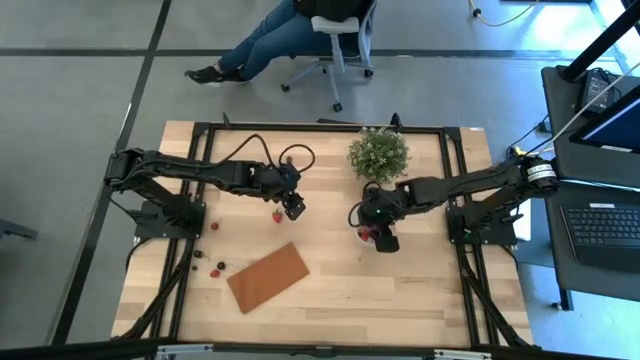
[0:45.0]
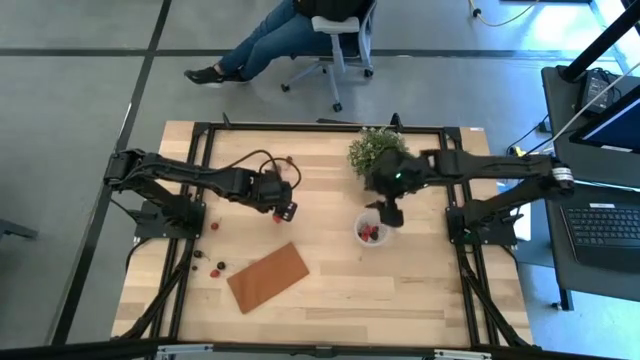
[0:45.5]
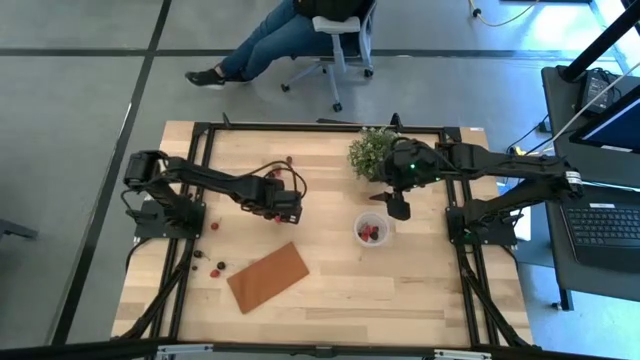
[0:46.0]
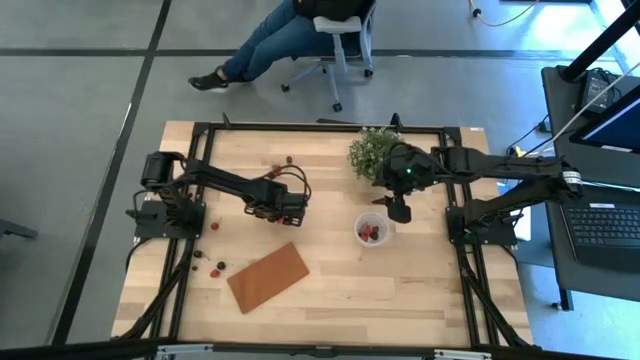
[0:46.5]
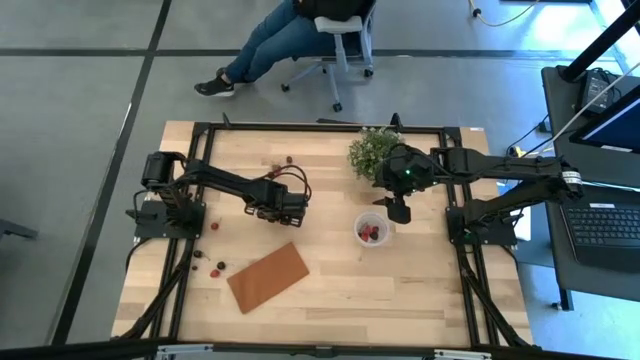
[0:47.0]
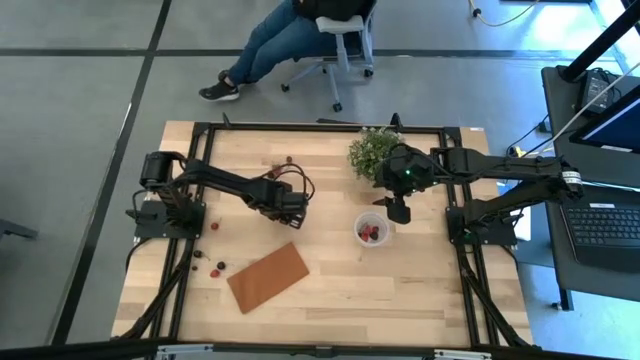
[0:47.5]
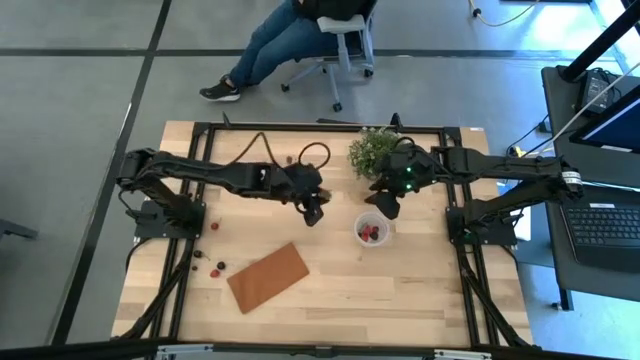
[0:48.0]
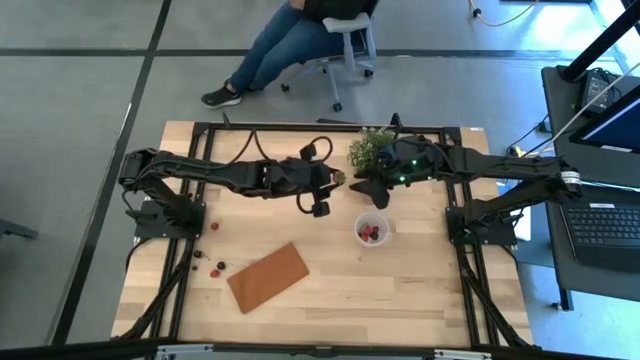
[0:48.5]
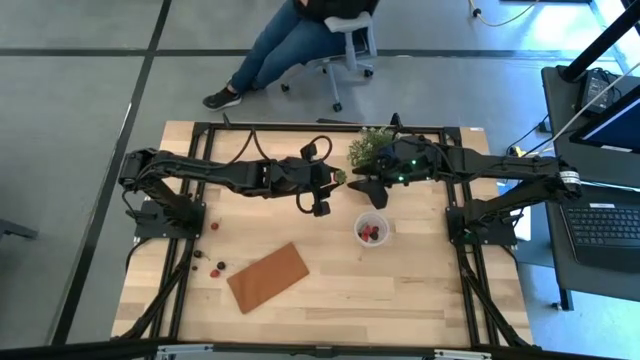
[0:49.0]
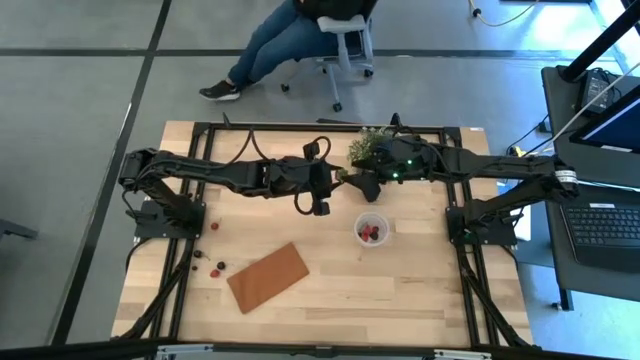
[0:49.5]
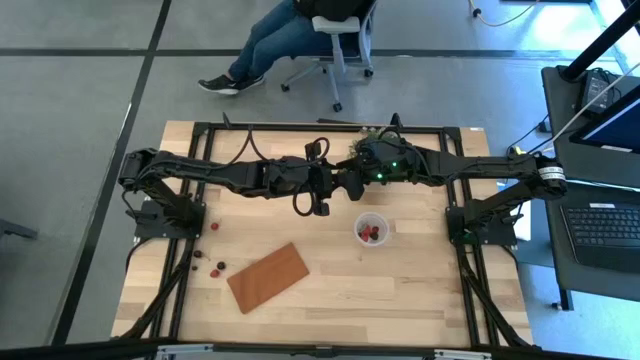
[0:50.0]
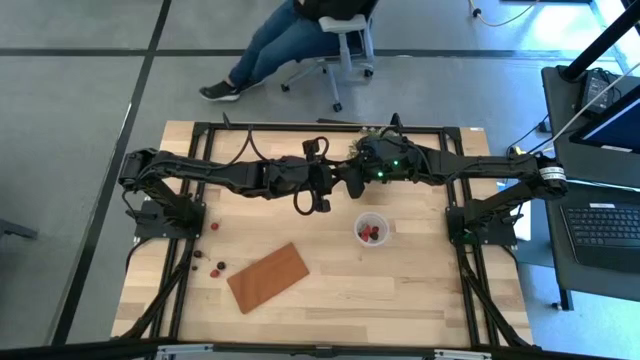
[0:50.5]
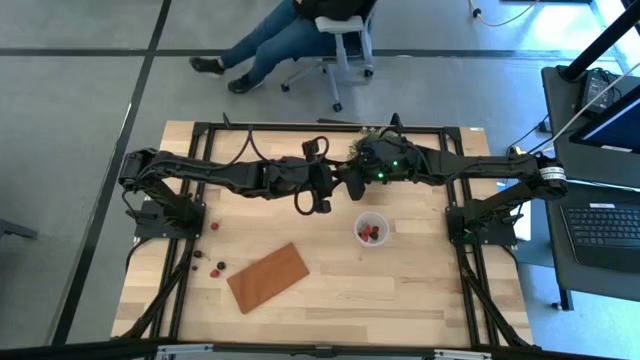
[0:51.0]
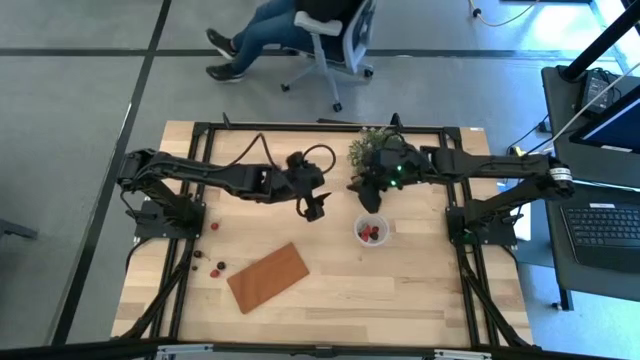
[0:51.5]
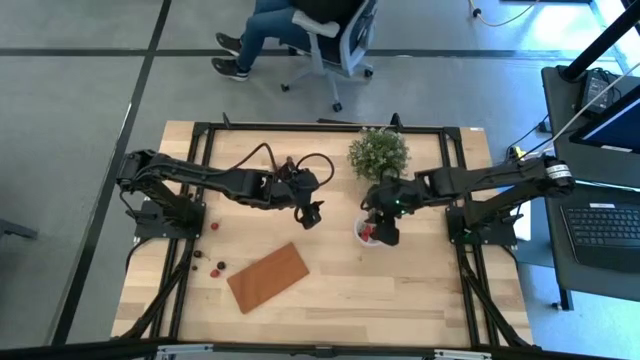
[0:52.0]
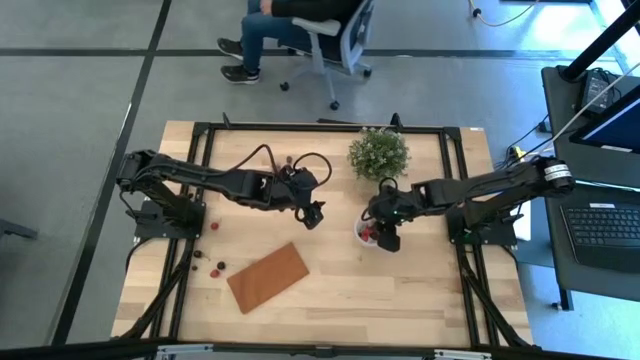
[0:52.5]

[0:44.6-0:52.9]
Task: Pick and placing Produce into tupperware
Put the red strawberry into the transparent container

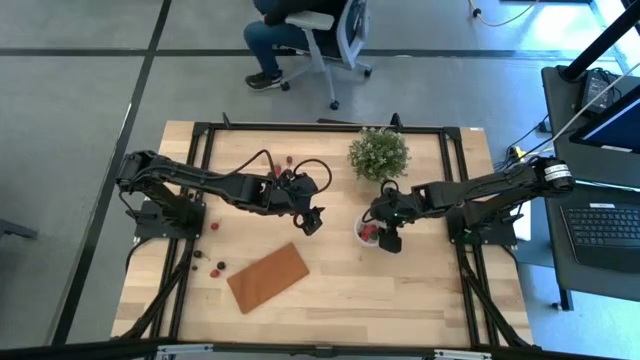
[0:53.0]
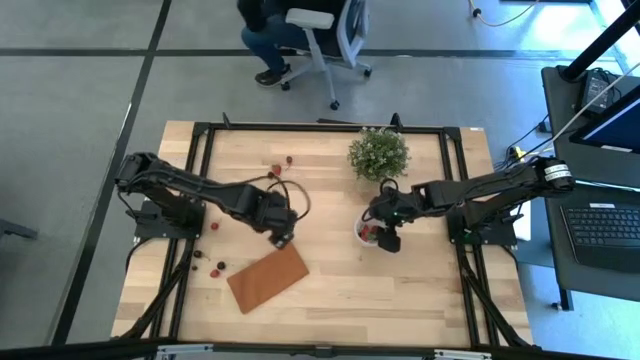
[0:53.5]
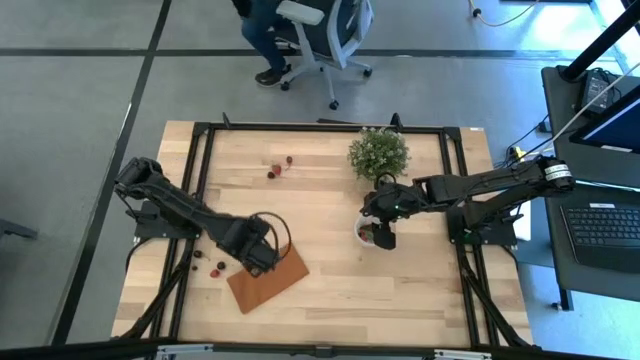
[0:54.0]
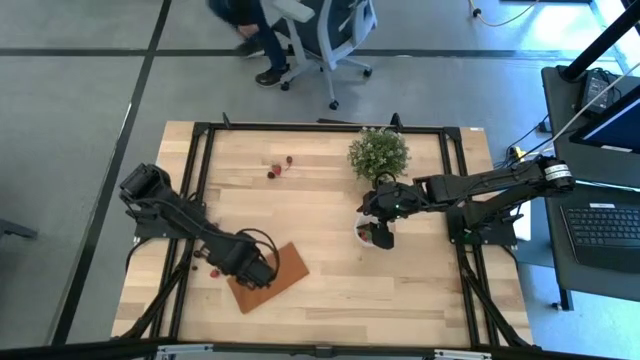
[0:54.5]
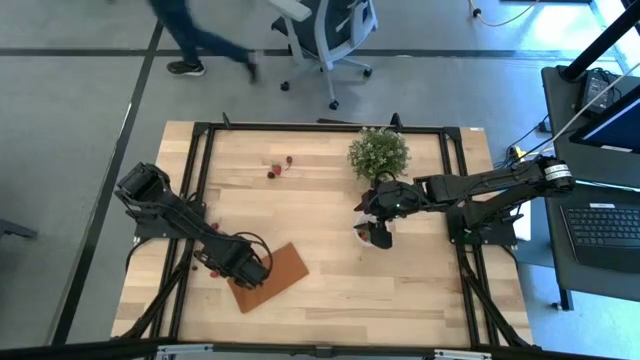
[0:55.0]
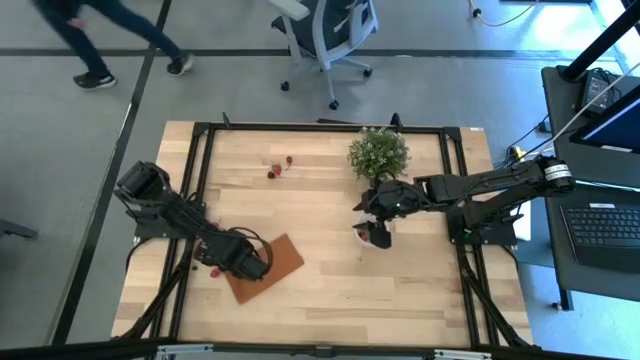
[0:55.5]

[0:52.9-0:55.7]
Put the black cherry into the transparent container

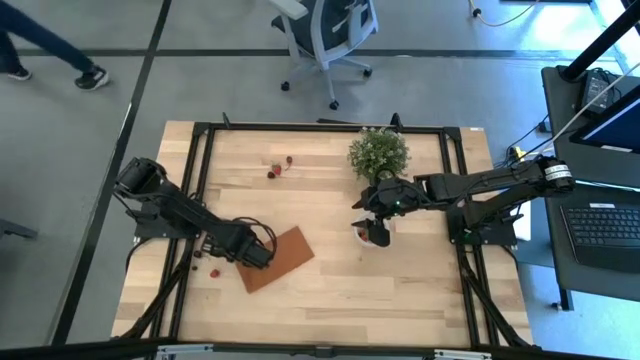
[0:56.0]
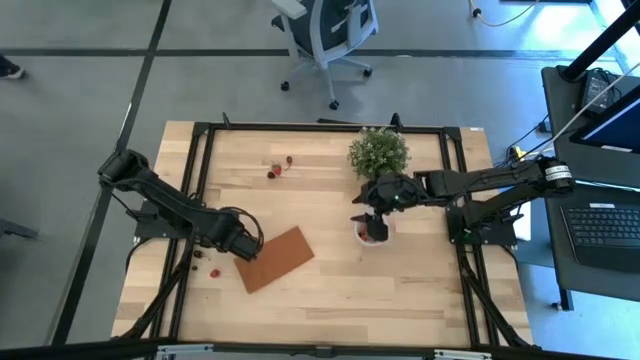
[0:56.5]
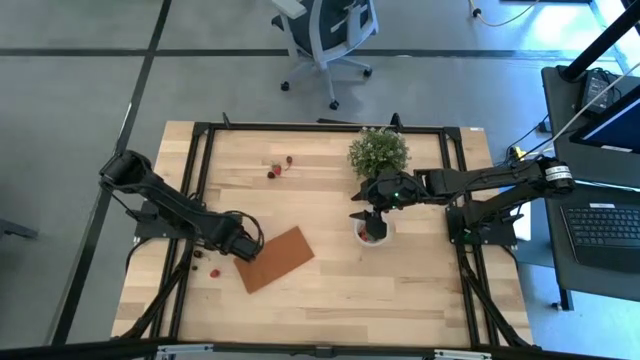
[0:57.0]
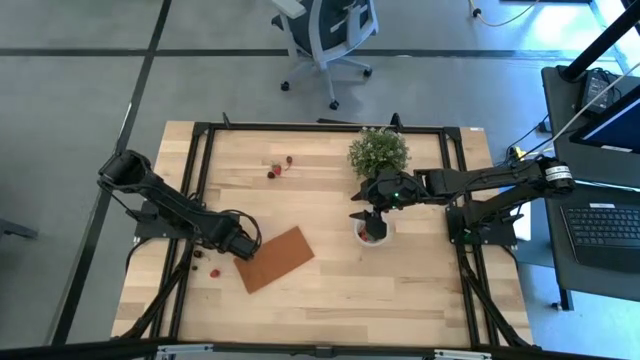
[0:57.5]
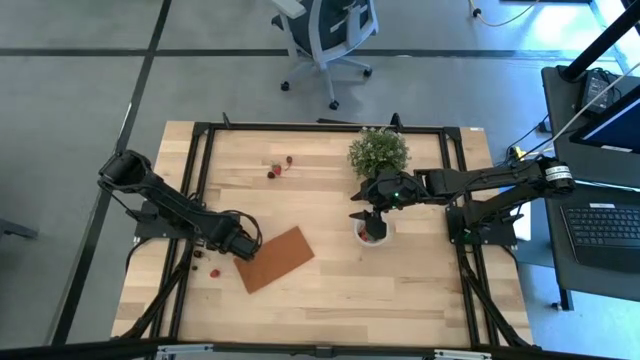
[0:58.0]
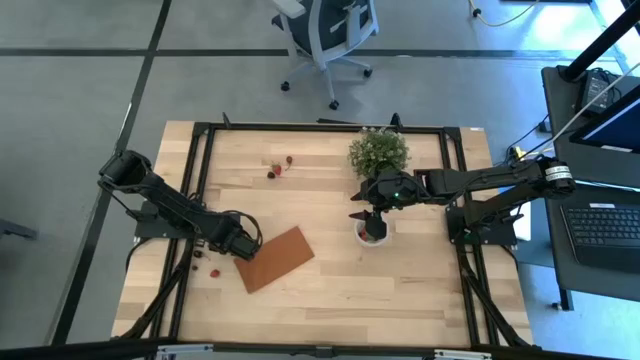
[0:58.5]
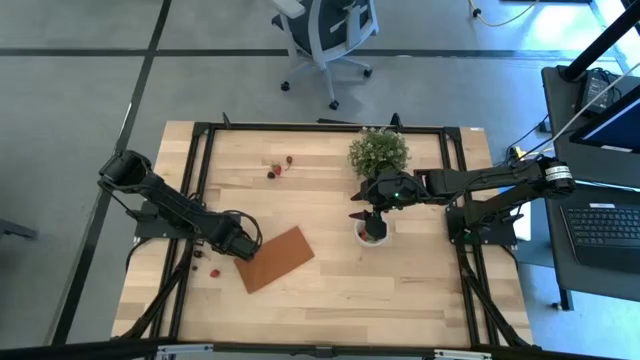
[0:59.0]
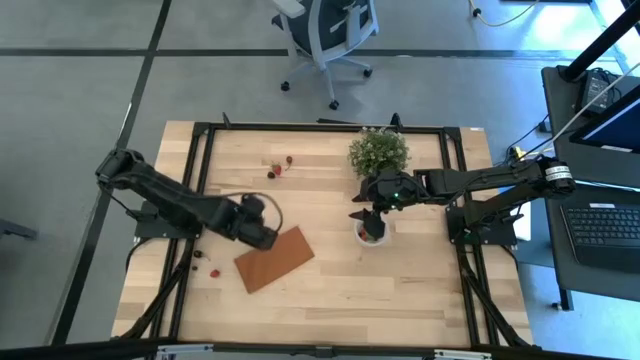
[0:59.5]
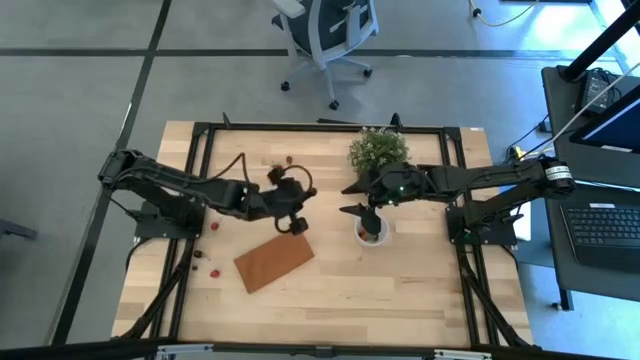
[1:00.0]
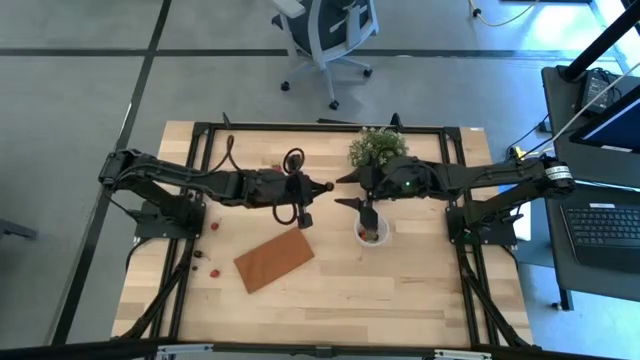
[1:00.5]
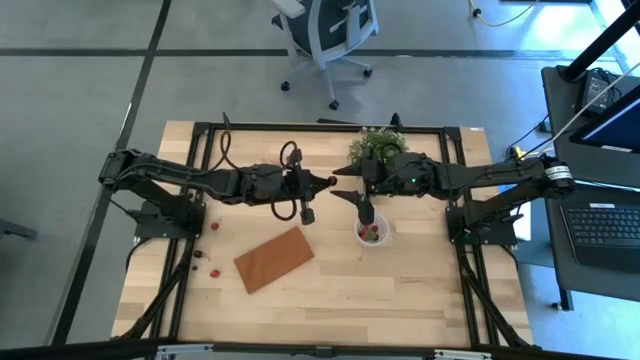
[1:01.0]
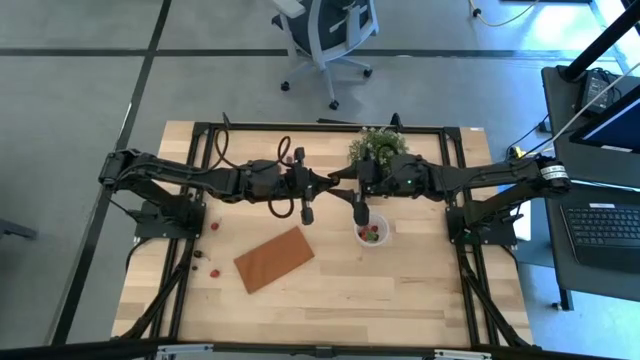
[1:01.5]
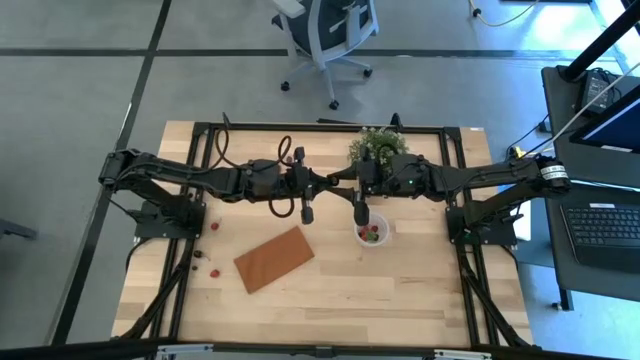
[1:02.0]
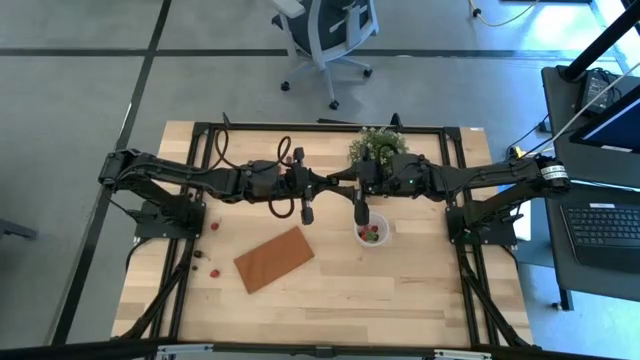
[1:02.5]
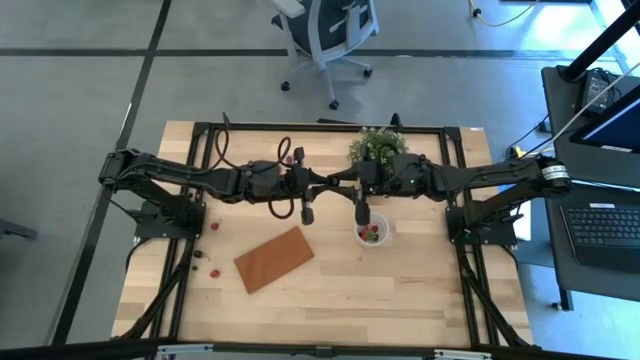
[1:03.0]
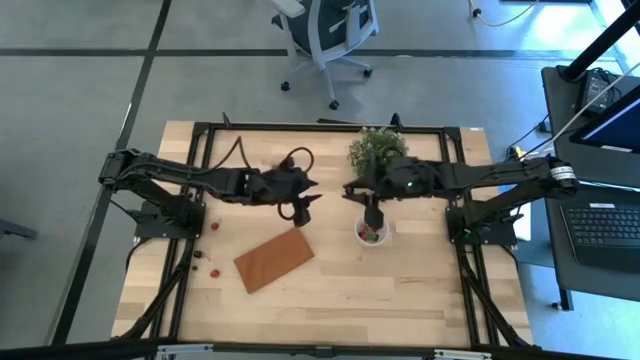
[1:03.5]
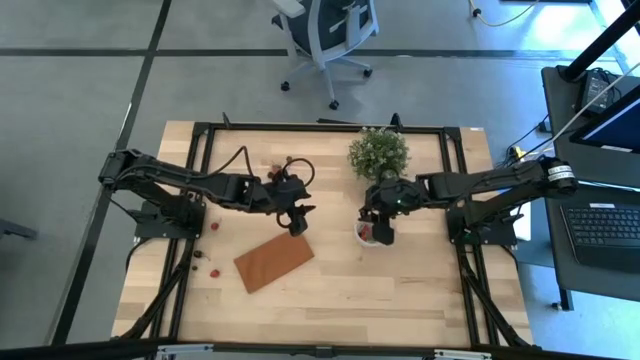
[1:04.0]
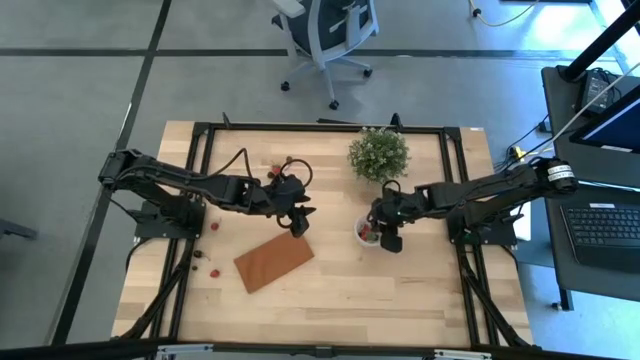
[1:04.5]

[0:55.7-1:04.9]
Put the black cherry into the transparent container
